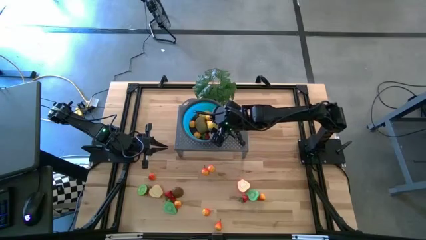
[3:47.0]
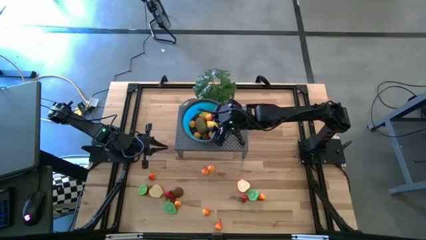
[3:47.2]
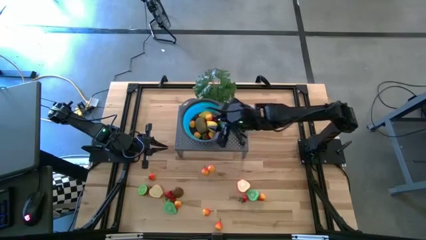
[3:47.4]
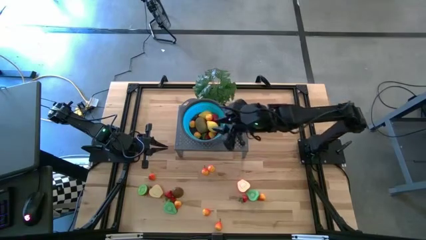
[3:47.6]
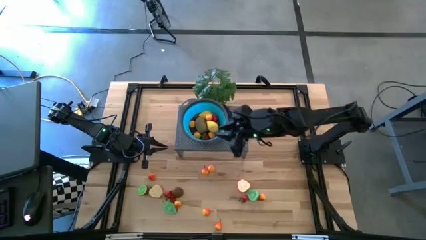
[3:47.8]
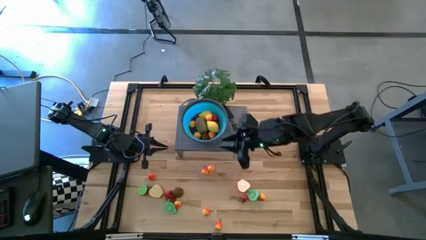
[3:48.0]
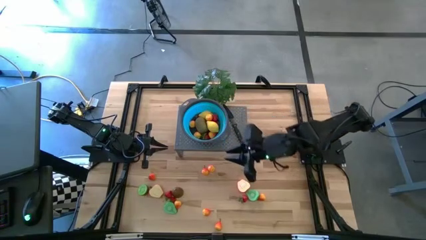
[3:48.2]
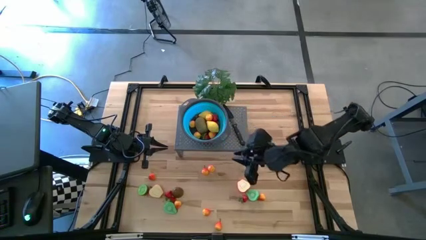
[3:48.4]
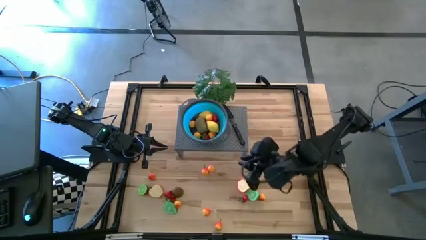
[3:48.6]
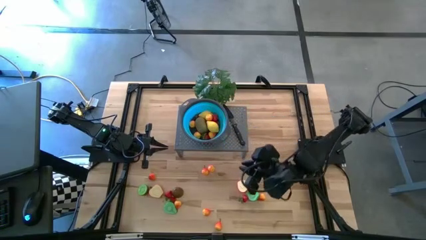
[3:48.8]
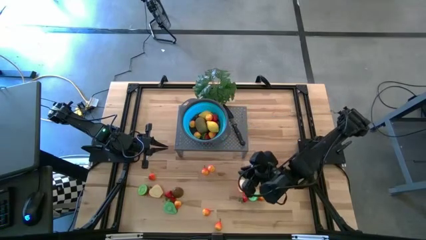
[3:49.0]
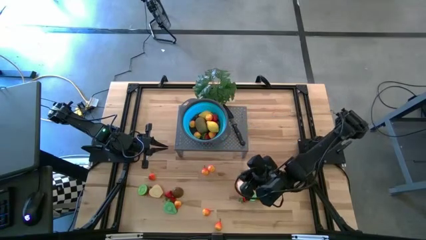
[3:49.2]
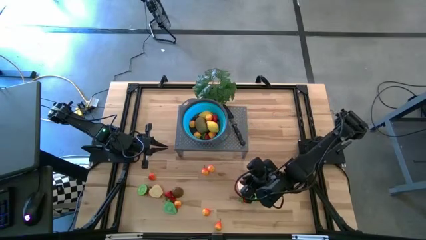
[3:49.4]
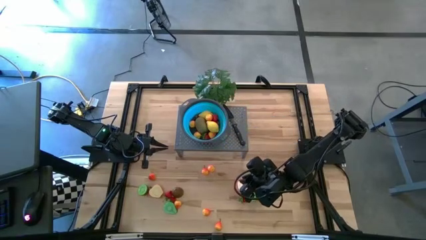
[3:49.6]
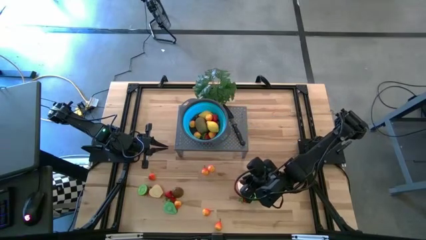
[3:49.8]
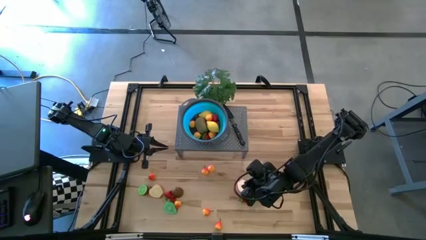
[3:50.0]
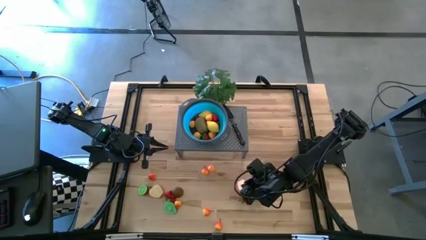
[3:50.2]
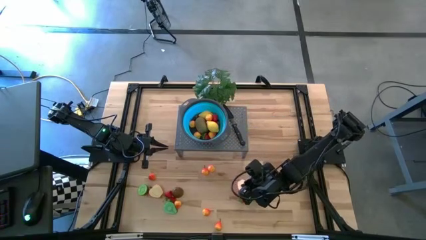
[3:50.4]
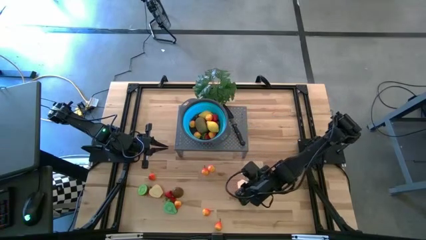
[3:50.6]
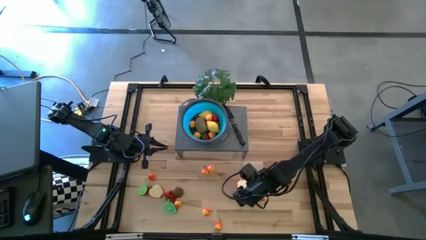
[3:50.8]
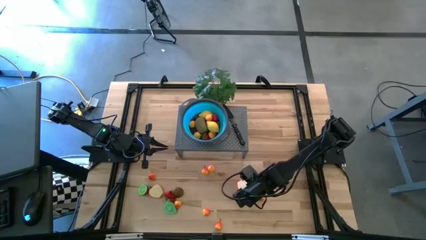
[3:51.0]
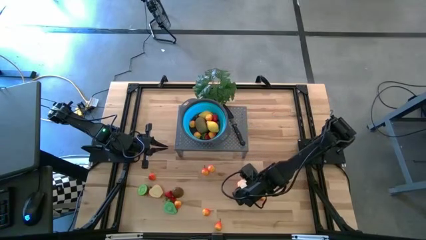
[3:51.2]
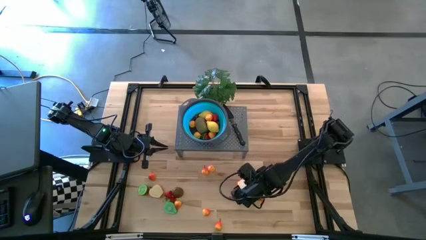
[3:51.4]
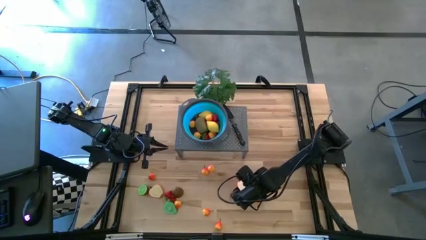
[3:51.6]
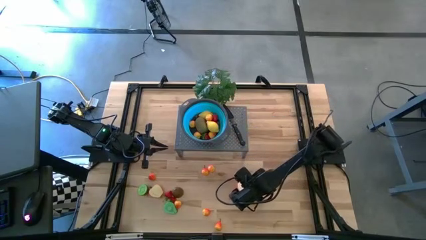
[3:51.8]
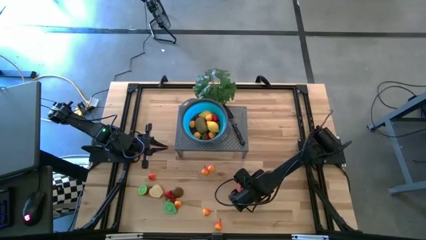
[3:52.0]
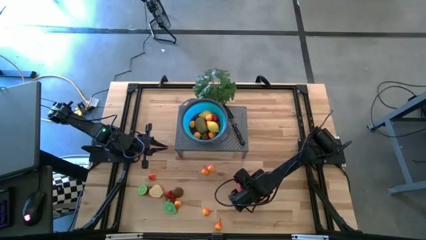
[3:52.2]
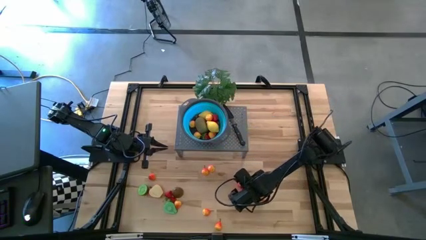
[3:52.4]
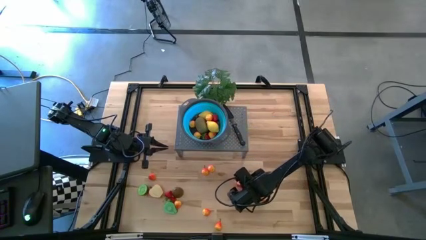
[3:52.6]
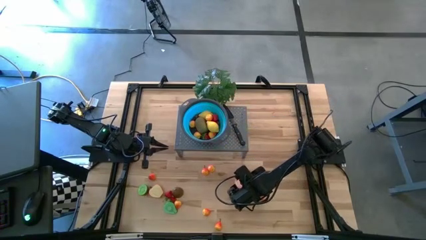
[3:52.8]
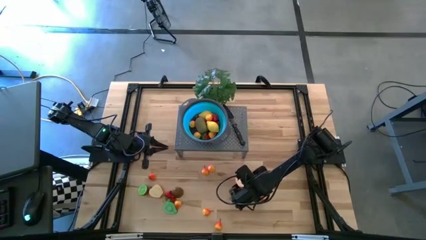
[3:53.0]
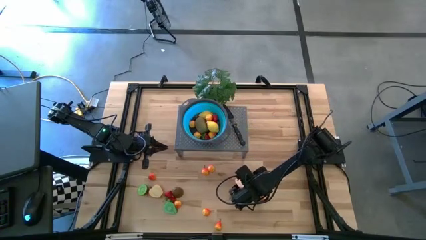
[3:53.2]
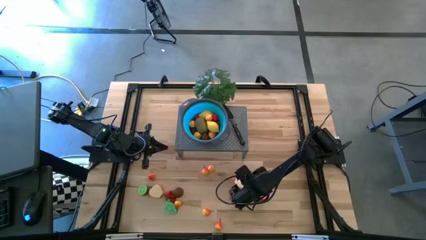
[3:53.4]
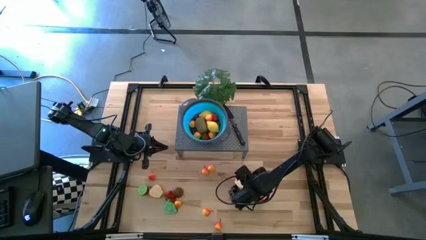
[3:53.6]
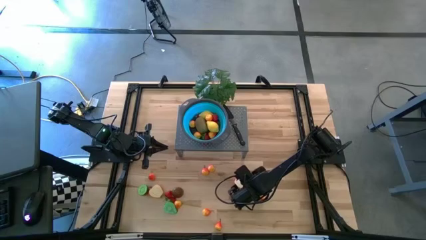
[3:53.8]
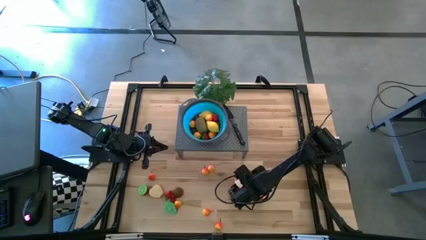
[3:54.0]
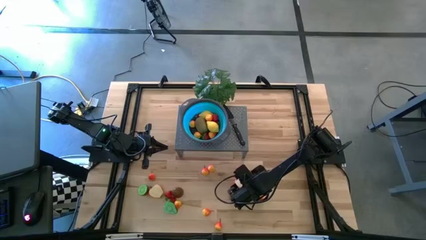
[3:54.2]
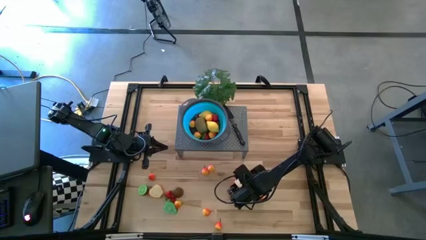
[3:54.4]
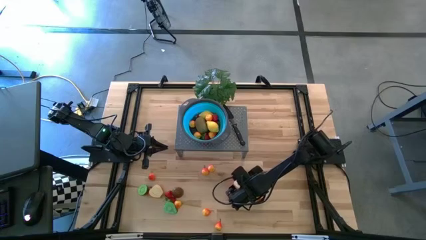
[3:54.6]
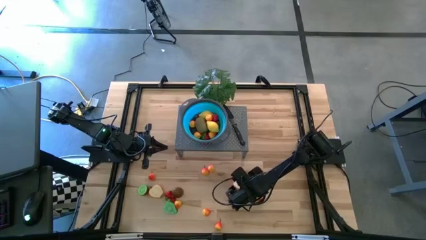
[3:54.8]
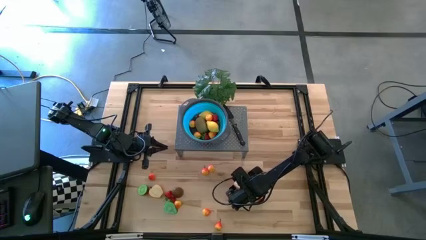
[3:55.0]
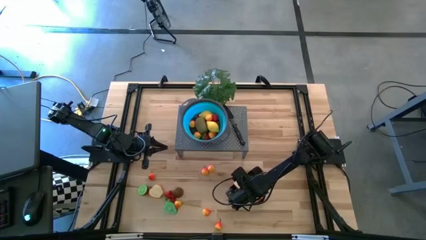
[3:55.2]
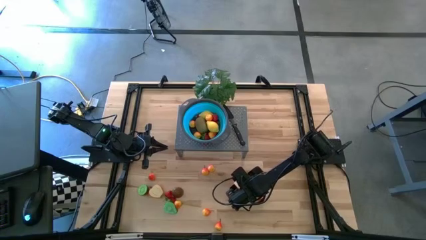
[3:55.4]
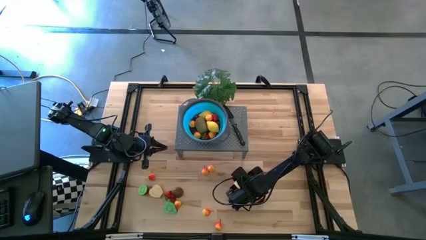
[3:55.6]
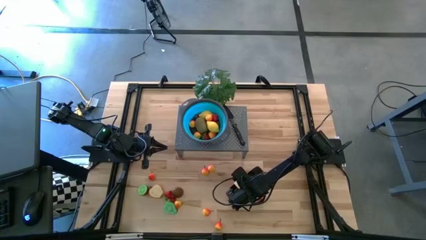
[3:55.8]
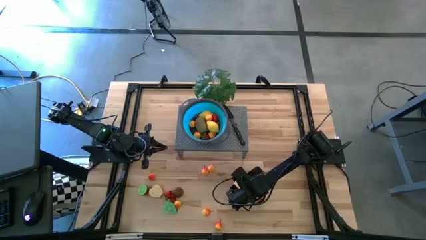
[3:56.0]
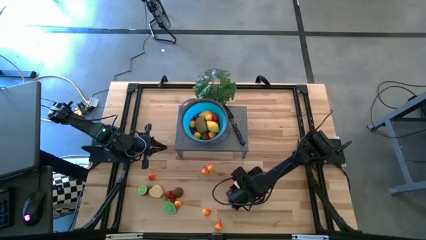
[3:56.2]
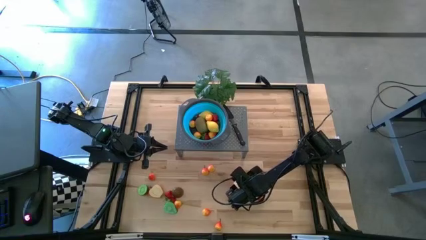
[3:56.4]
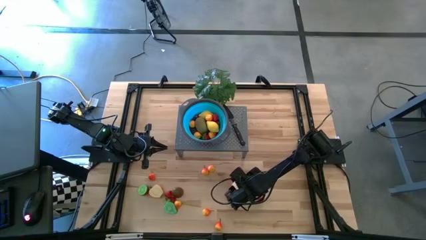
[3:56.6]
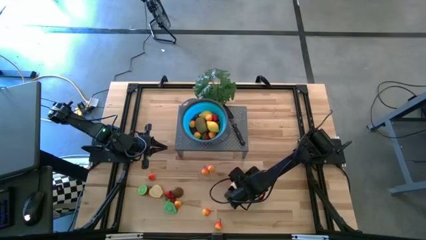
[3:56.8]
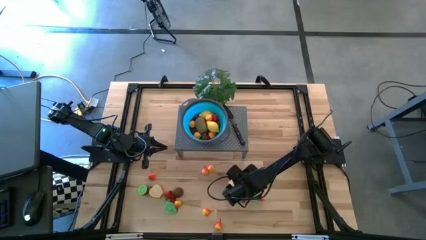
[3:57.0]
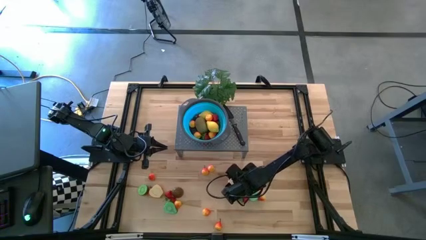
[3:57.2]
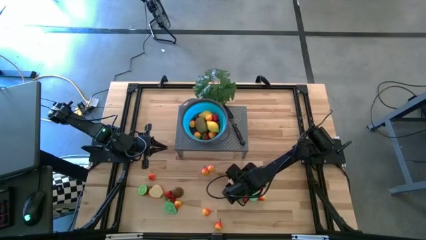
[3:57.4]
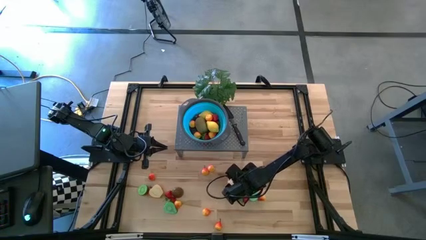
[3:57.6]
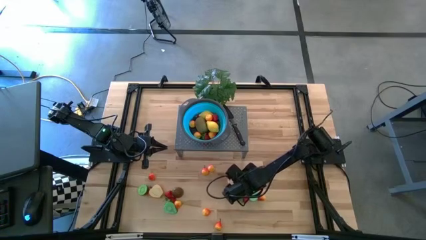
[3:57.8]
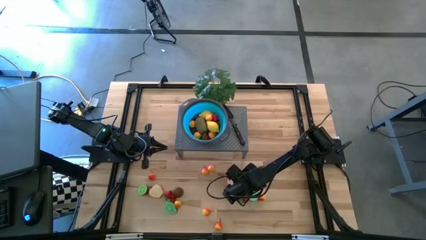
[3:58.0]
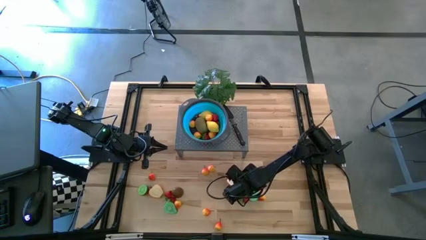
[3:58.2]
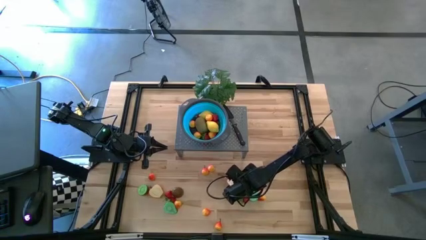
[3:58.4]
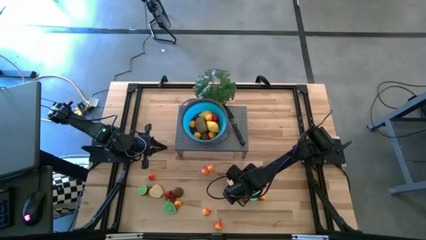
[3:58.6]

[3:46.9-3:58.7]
Task: Pick & Place Fruit
Put the apple into the blue strainer bowl on the shelf
